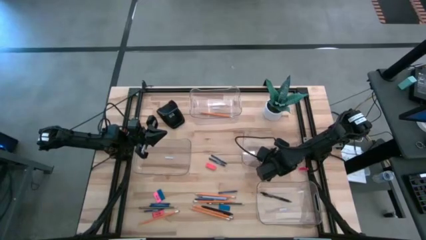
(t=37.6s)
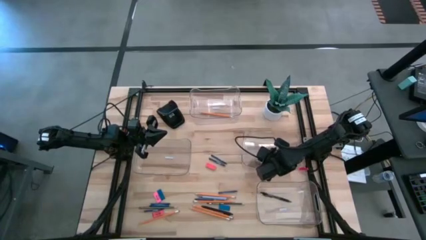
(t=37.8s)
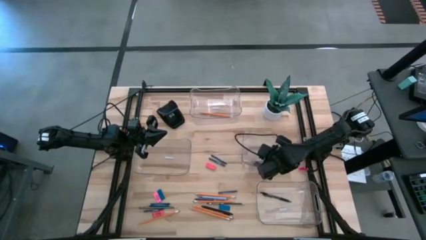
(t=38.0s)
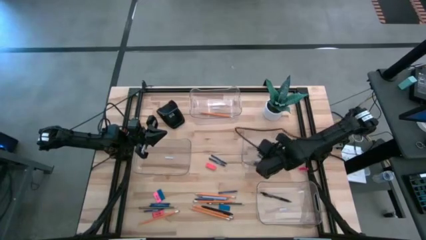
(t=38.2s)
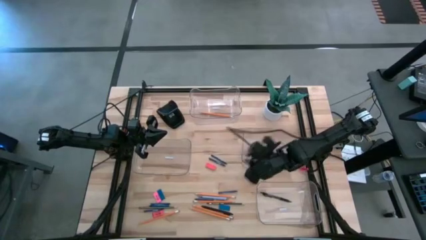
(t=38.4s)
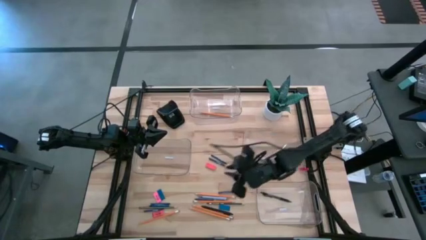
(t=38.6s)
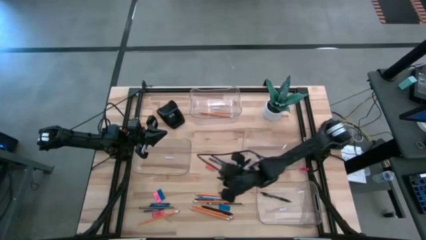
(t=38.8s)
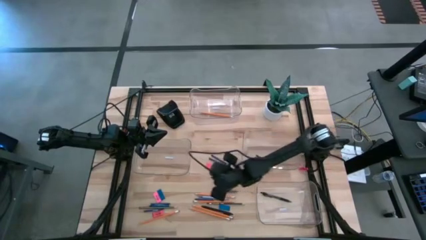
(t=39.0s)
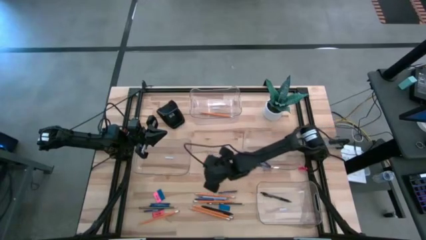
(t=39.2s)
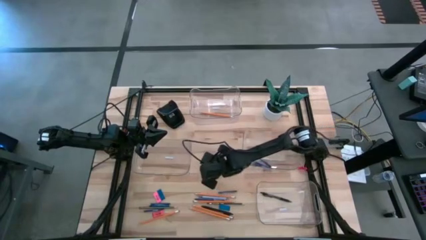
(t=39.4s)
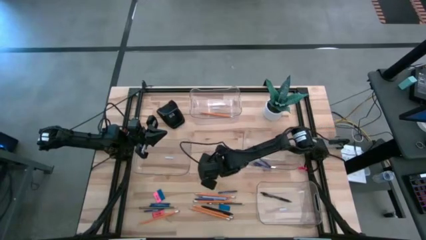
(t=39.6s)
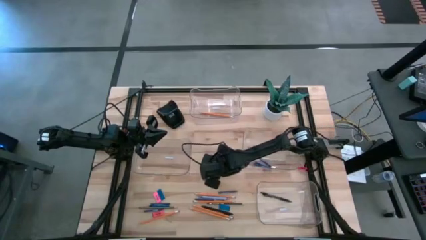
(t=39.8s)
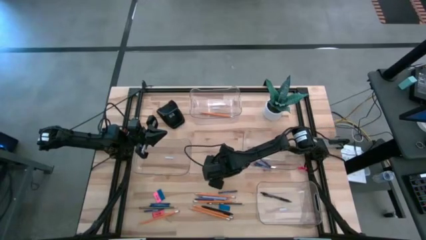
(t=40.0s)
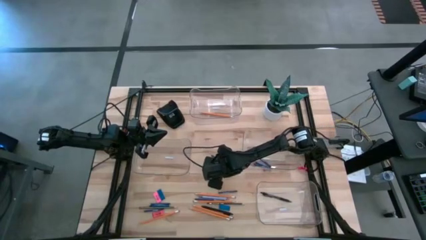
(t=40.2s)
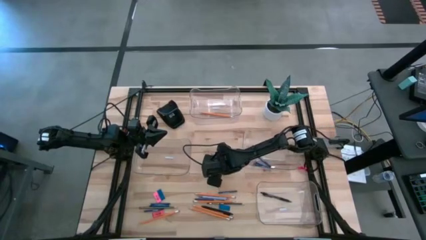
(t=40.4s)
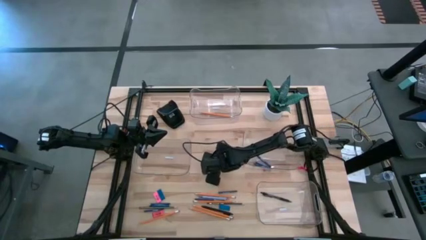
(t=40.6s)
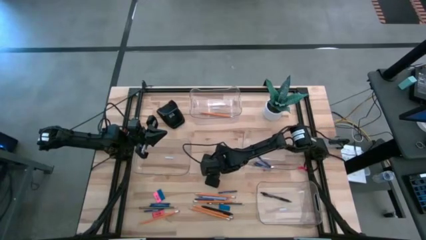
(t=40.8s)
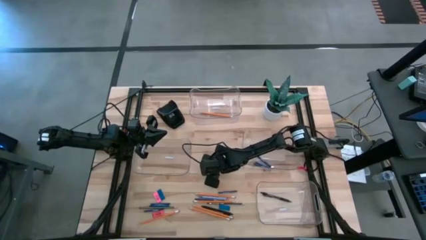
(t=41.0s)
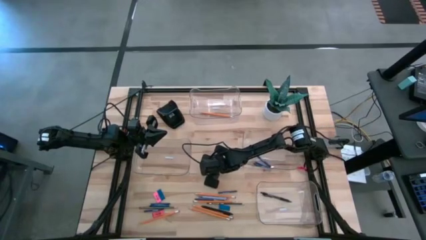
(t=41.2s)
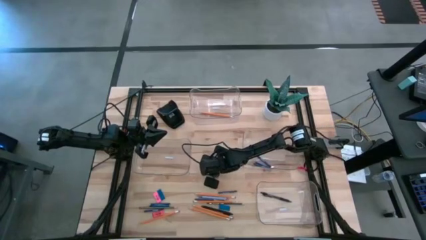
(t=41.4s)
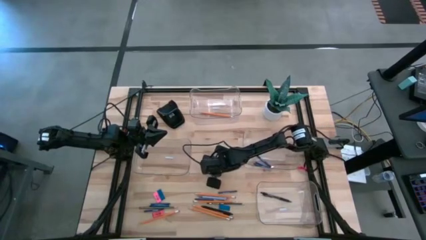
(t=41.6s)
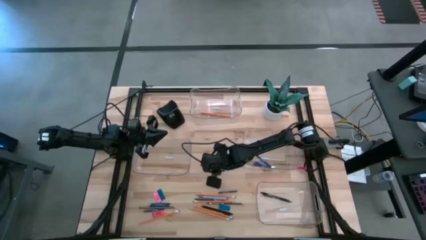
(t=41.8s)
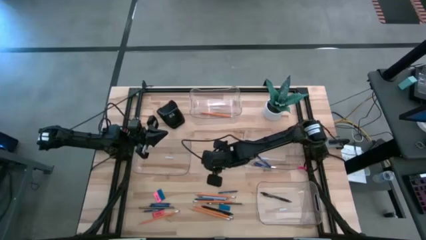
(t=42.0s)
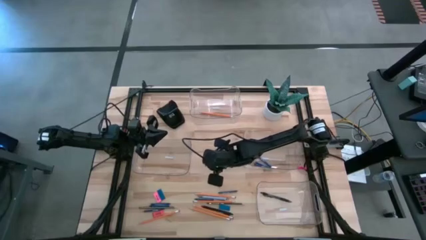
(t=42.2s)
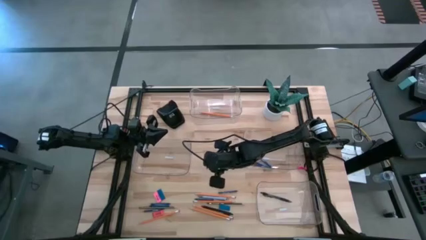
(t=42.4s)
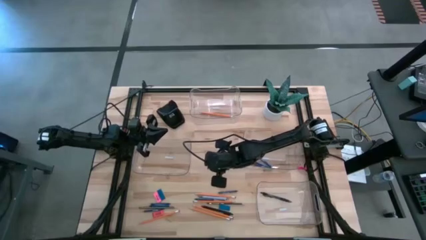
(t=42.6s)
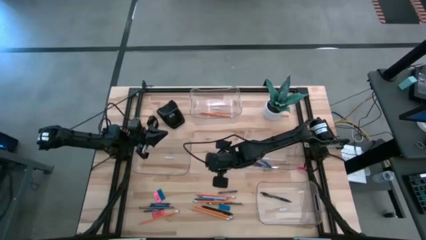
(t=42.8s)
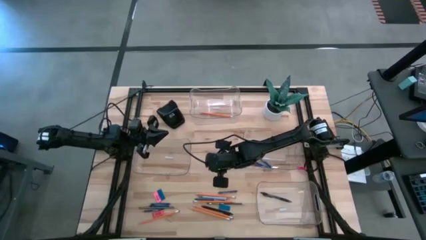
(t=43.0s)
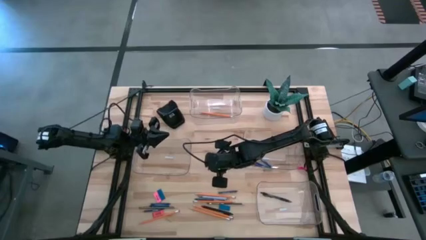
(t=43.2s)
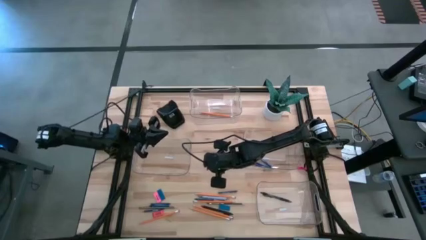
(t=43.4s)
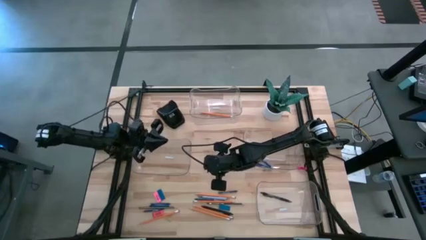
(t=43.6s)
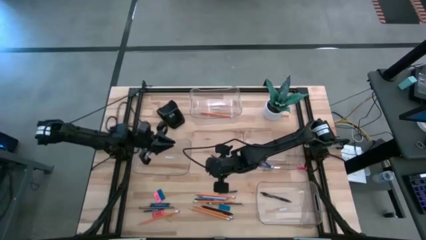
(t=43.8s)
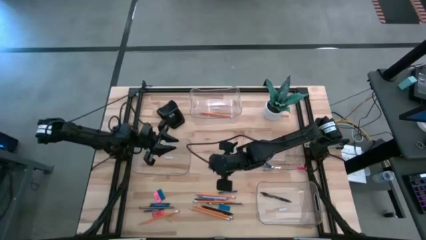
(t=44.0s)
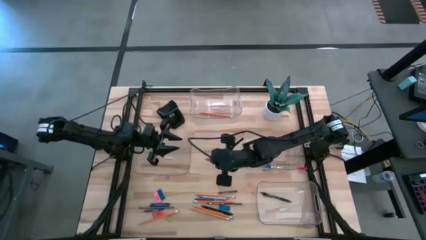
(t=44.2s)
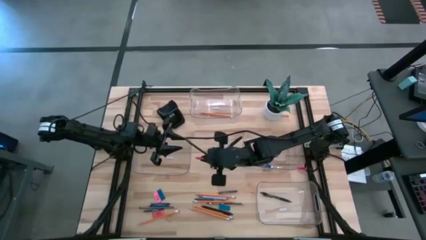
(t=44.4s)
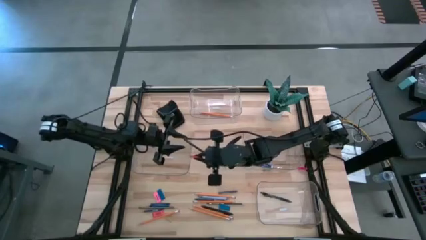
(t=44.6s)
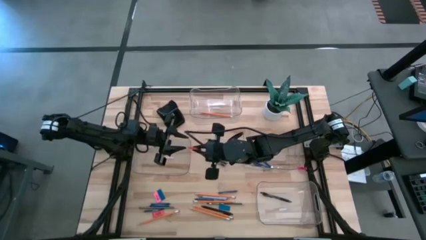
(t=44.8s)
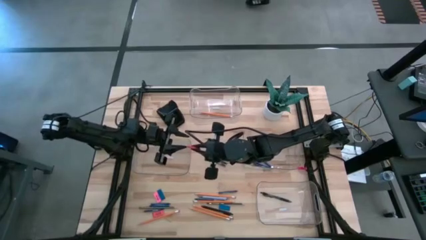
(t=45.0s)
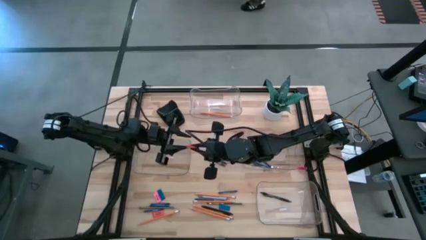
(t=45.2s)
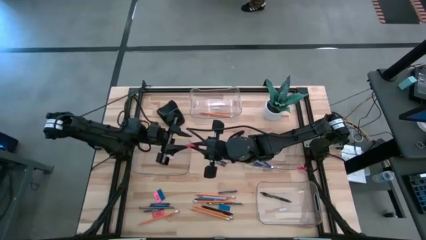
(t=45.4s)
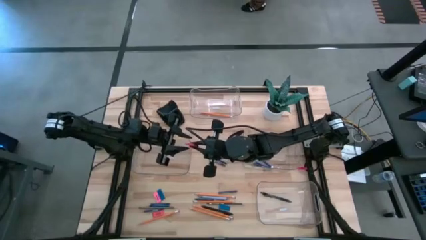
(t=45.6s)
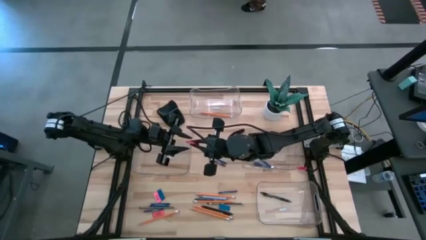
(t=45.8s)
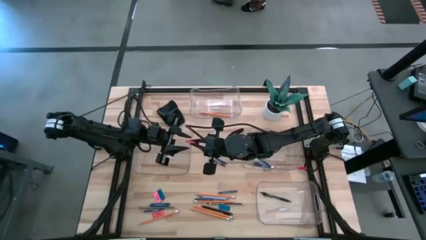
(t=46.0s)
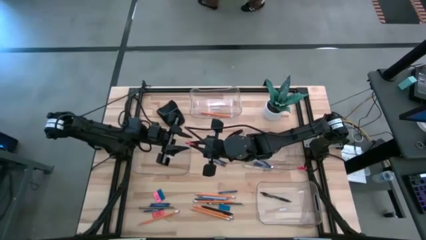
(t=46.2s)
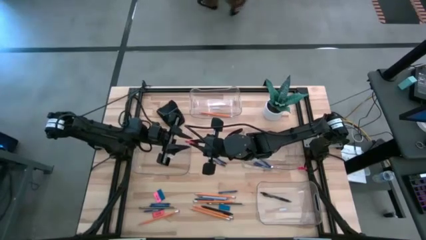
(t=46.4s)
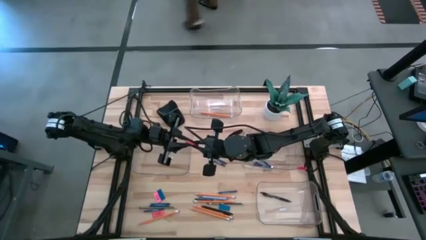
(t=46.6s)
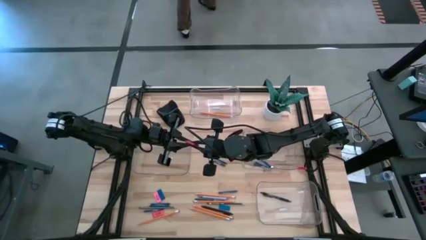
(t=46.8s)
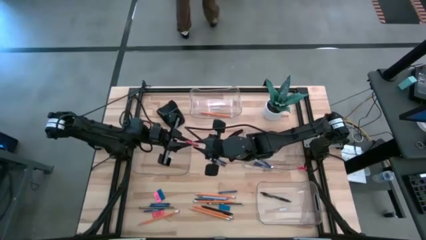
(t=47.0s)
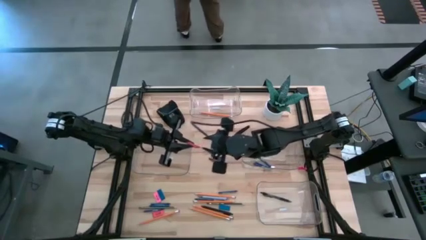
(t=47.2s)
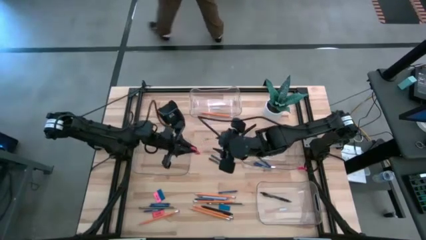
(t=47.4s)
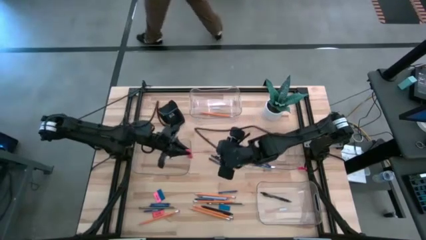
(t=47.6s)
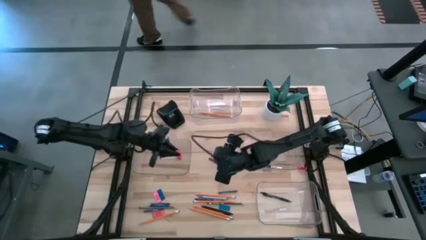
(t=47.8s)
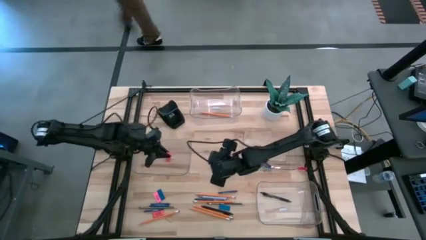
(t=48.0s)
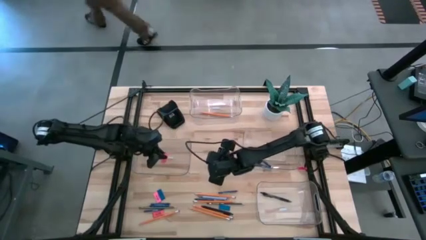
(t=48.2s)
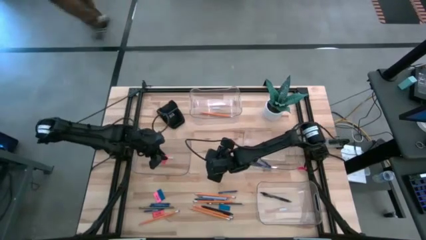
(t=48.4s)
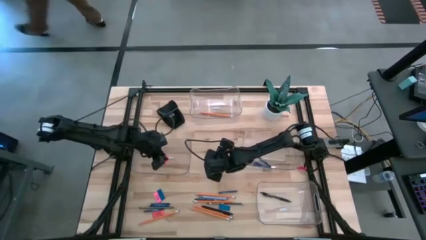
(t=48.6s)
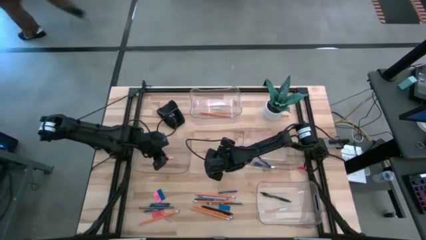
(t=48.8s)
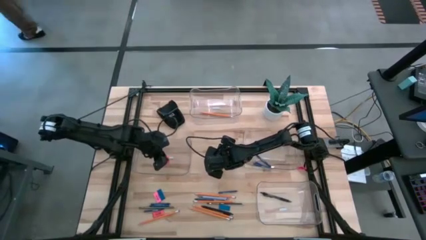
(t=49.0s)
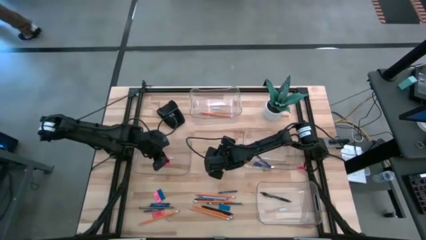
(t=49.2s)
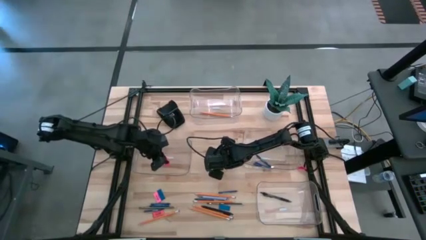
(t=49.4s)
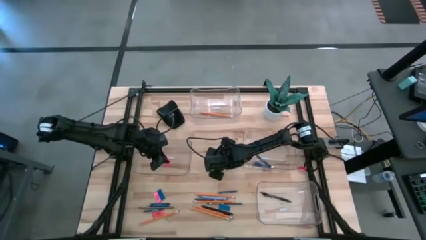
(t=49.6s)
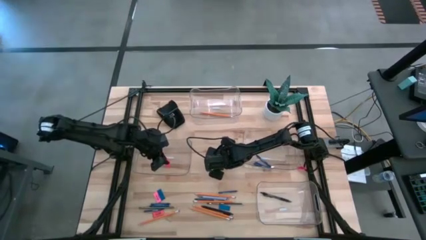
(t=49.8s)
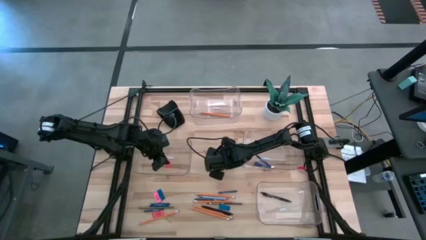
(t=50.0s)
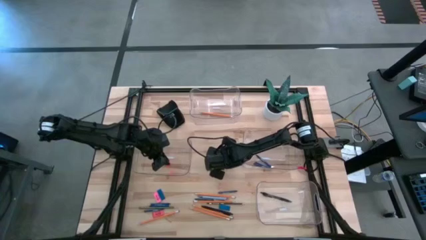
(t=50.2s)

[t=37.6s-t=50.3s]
Task: Sort crayons/erasers/pens/pencils in bins
Put the orange eraser into the middle left transparent bin

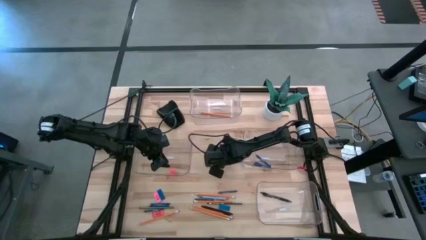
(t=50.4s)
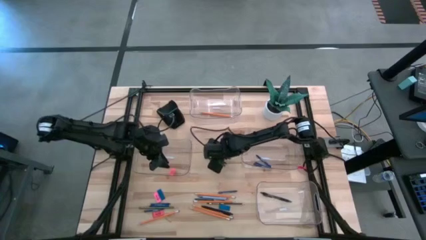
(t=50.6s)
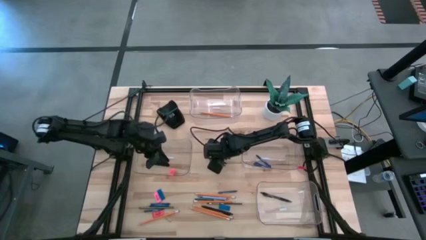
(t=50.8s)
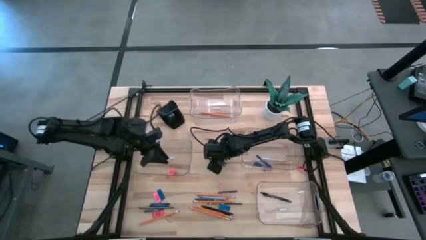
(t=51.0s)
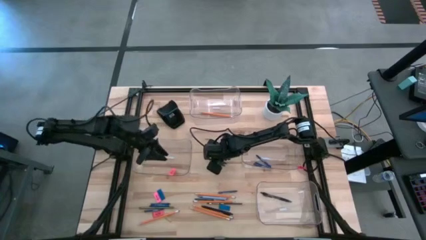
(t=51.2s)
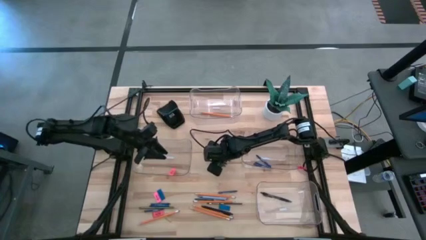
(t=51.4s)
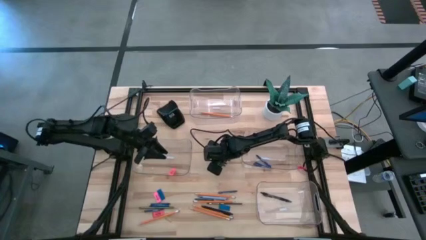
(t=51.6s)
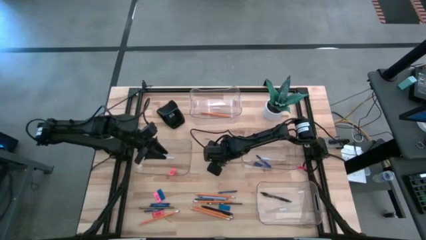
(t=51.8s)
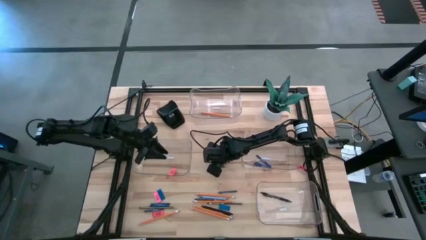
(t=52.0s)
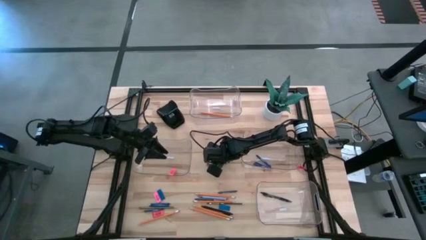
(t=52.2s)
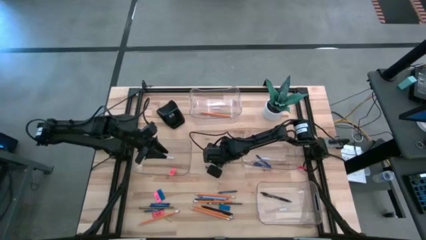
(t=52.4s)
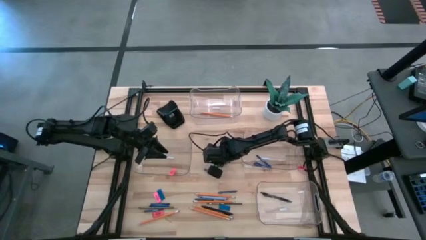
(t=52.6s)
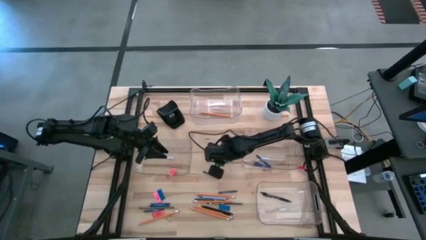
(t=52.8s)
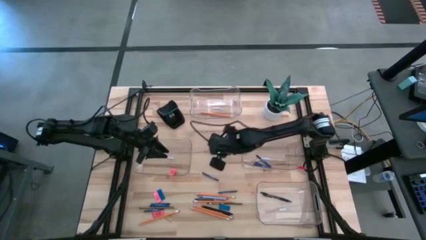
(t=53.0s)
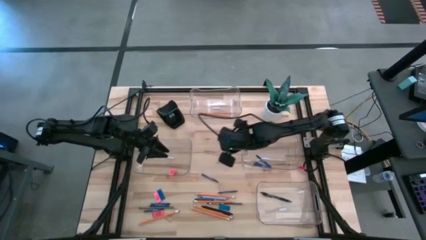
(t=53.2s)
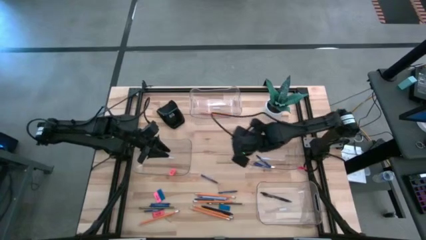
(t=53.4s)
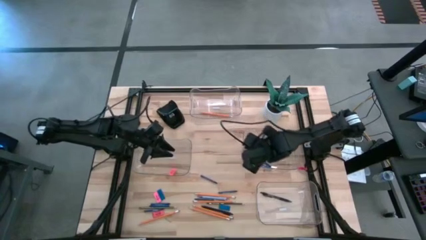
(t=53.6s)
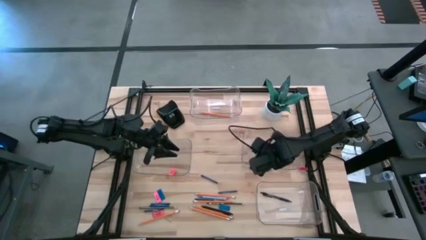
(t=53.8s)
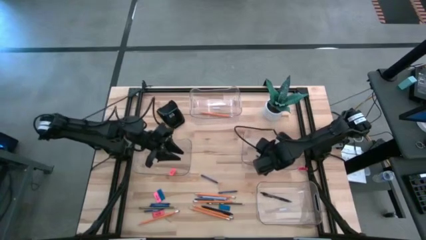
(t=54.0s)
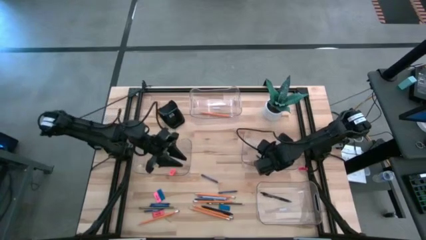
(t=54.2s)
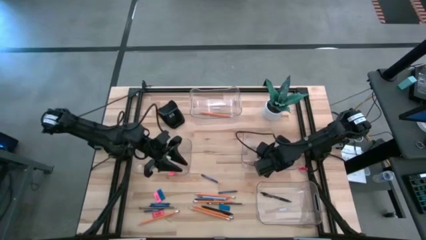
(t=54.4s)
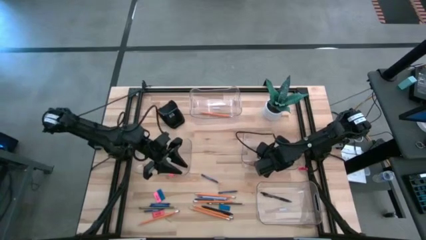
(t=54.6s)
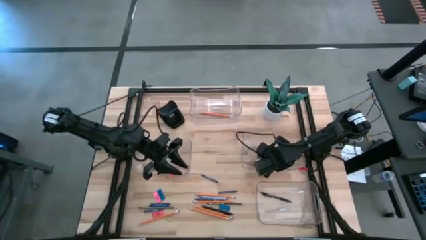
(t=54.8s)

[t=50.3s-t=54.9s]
Put the blue crayon into the middle right transparent bin
